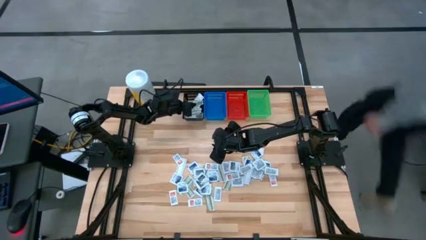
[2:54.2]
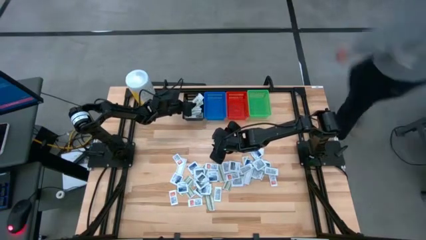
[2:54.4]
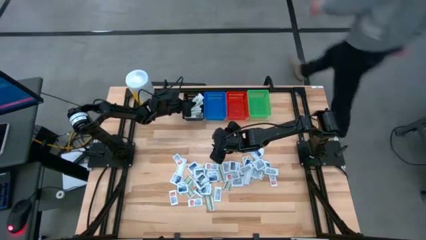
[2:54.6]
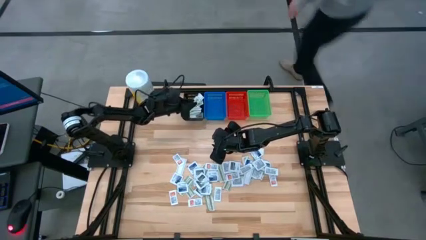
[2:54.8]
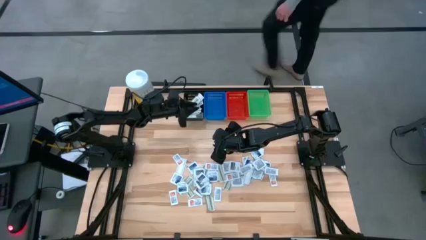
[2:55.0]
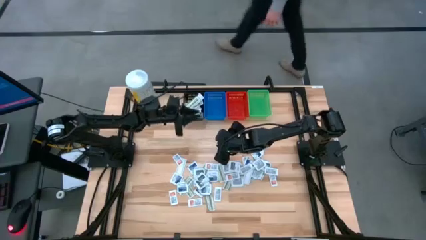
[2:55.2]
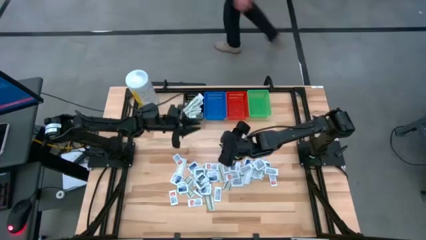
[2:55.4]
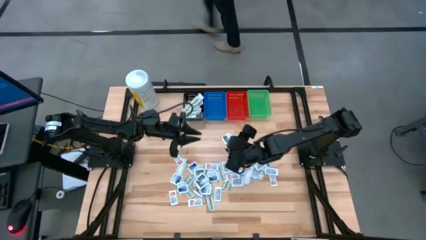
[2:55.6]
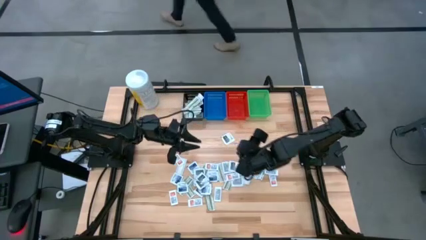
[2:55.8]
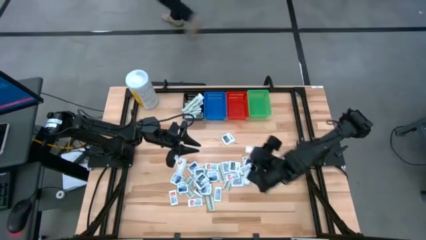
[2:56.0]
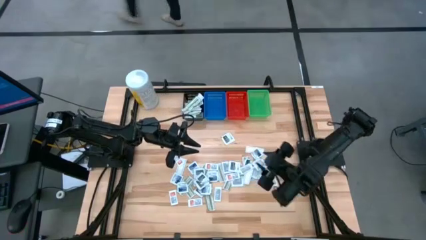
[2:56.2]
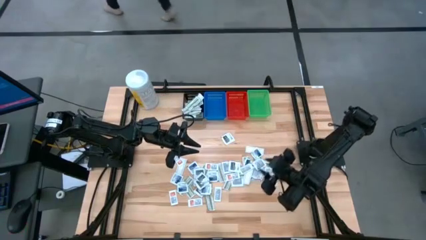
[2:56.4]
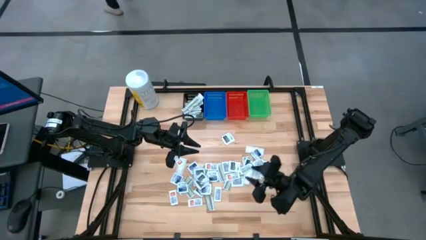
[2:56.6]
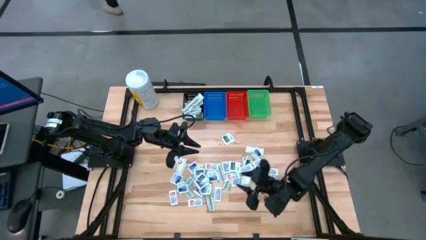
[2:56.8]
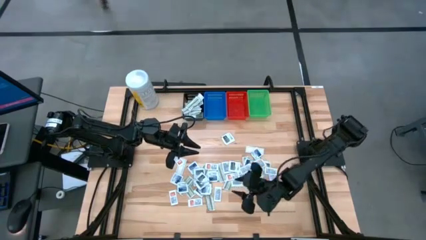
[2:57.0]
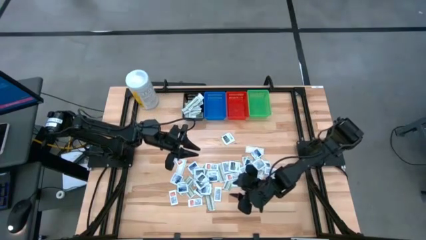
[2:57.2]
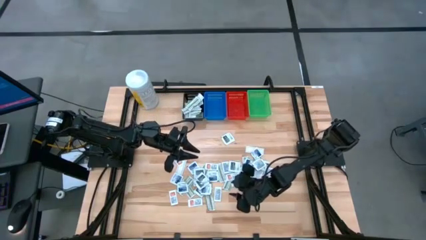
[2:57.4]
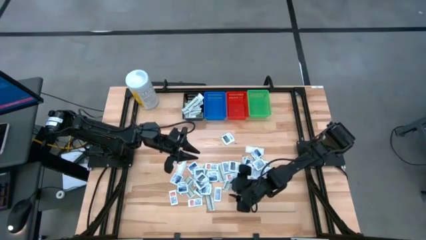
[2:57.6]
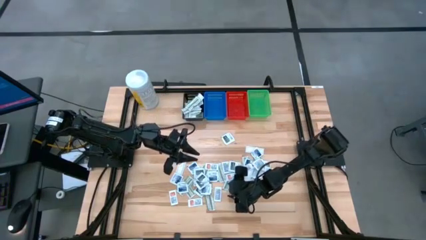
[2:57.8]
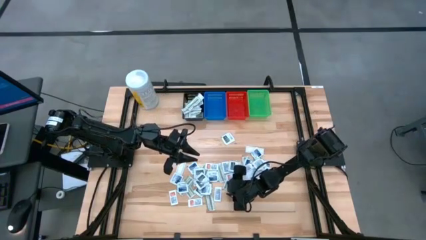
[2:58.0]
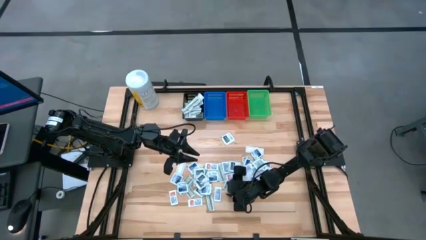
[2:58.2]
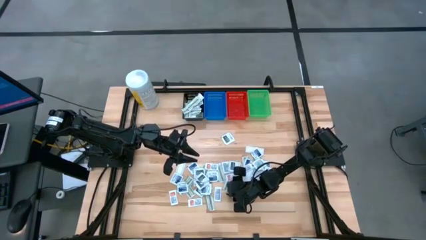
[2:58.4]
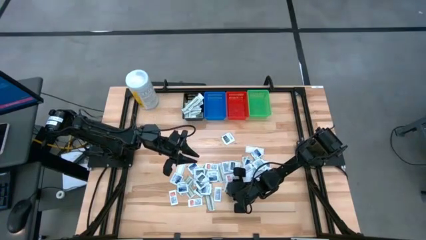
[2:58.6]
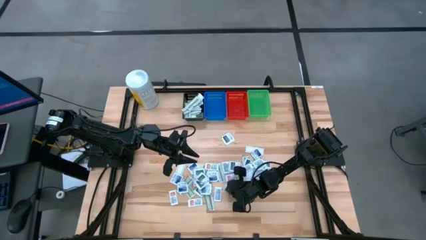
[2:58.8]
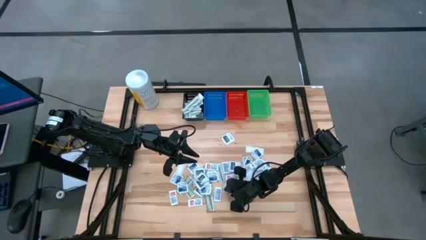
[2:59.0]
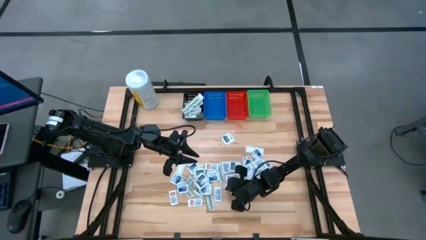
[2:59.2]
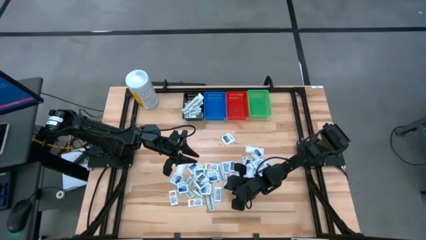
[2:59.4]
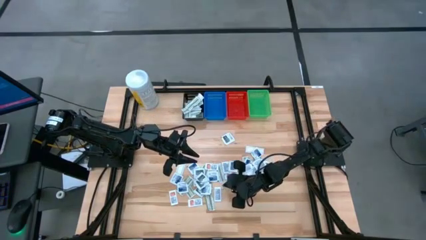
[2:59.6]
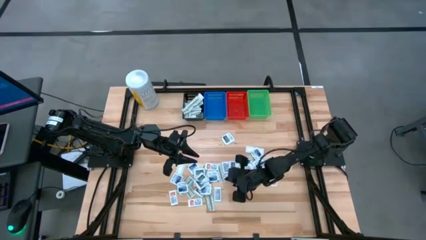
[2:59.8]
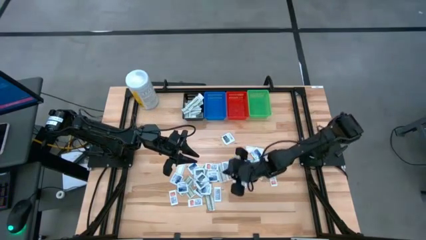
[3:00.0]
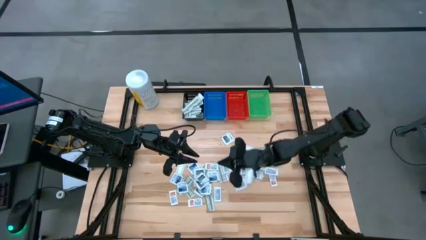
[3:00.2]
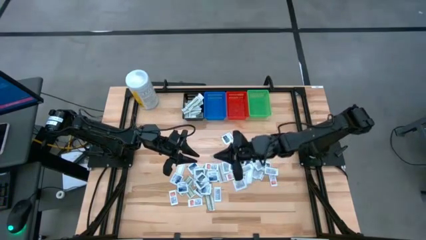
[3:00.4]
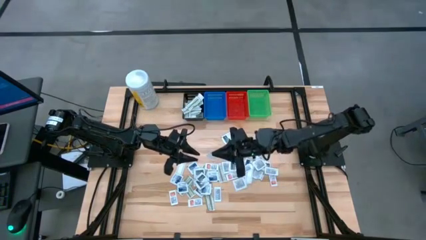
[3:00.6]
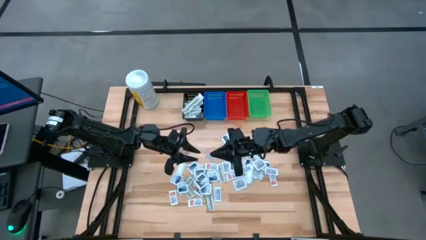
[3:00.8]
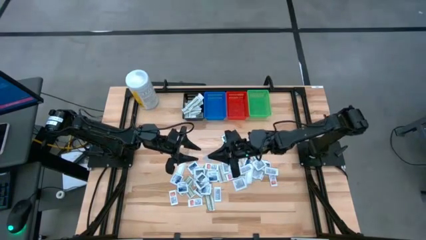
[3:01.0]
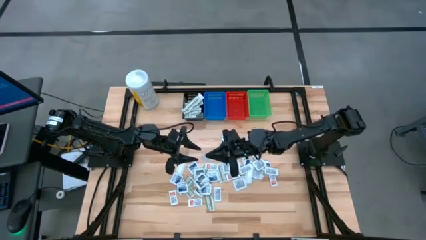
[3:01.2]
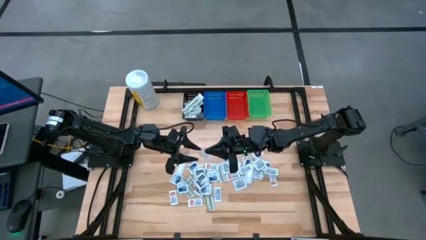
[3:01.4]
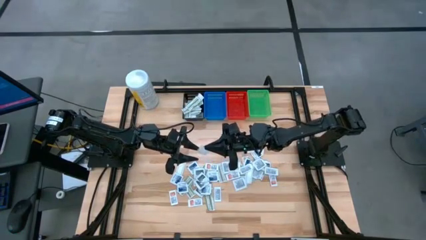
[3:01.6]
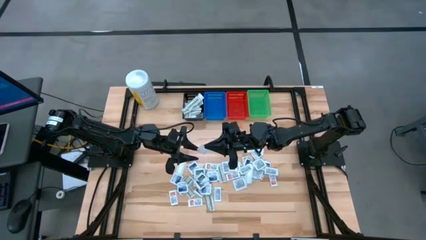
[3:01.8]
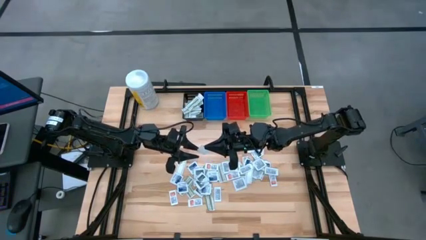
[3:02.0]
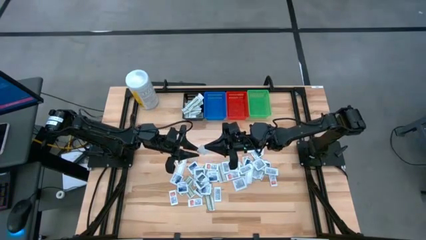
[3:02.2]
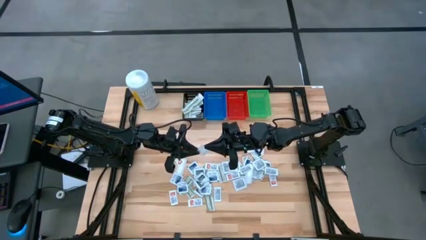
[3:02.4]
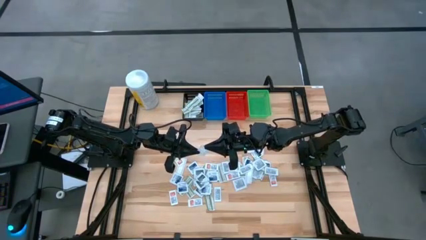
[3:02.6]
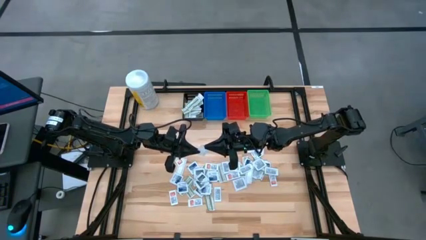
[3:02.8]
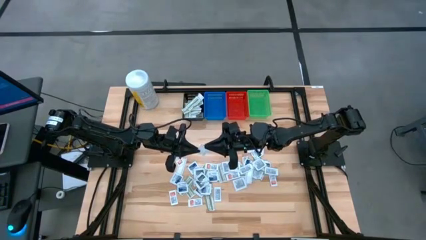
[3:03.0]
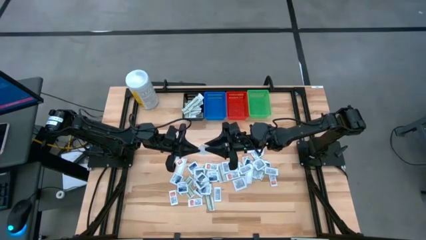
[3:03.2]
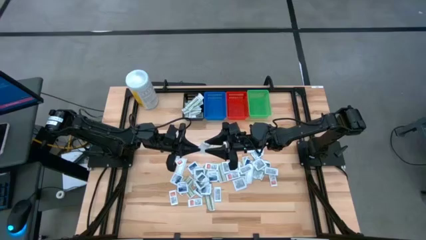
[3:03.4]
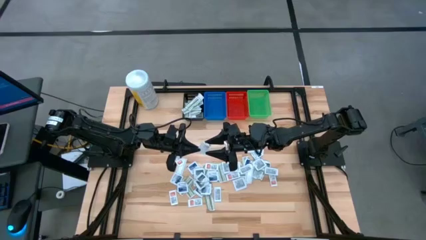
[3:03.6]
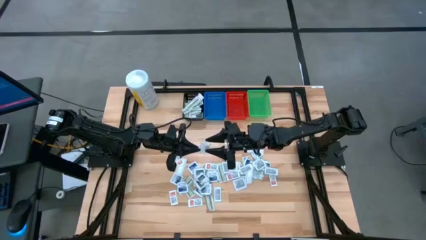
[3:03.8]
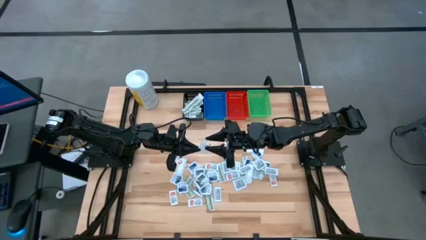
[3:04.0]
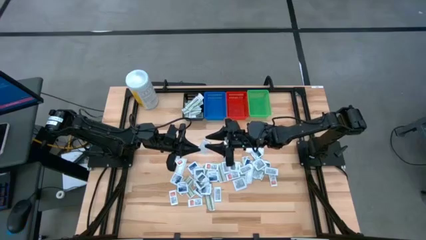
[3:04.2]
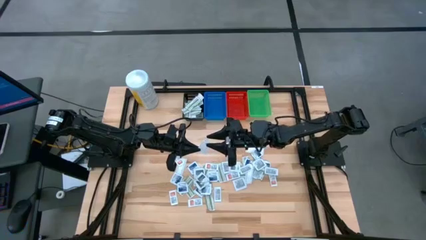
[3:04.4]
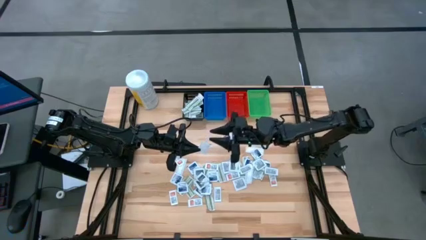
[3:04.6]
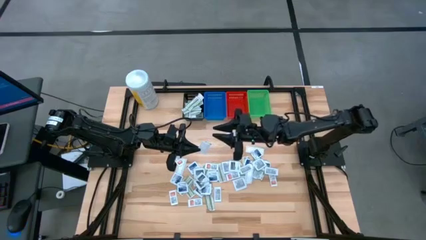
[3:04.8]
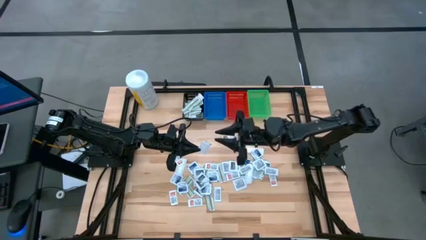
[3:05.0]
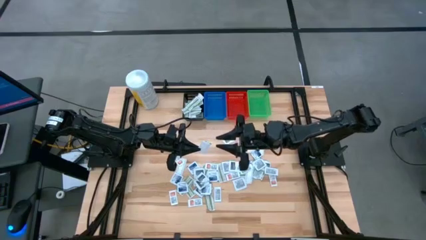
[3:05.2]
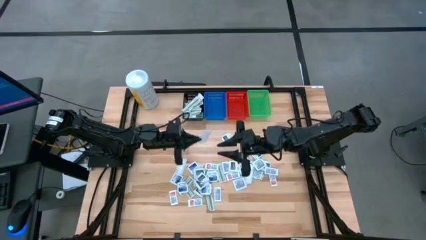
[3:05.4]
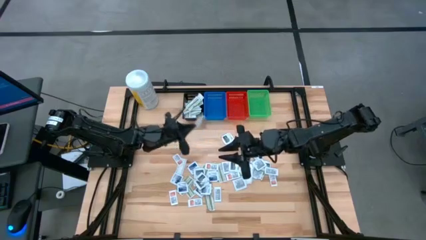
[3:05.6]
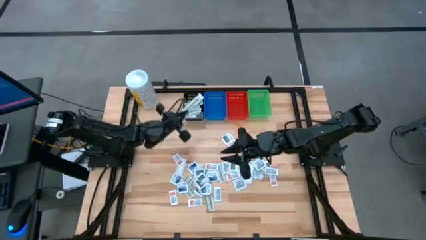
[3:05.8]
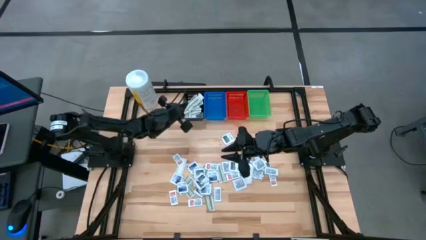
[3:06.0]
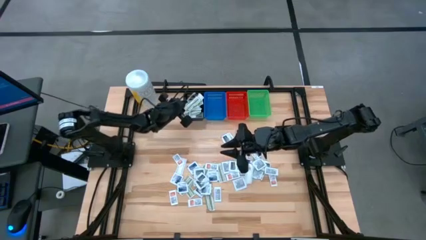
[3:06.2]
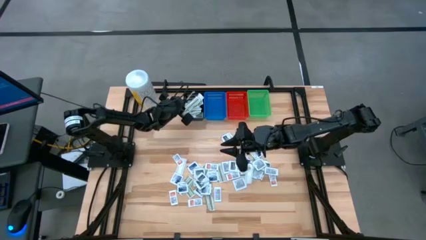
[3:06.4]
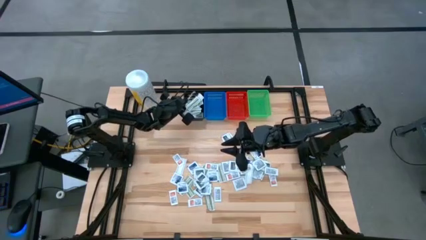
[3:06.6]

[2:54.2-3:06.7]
Task: Pick & Place First Aid Supplies
Put the green bandage pack in the black bin
